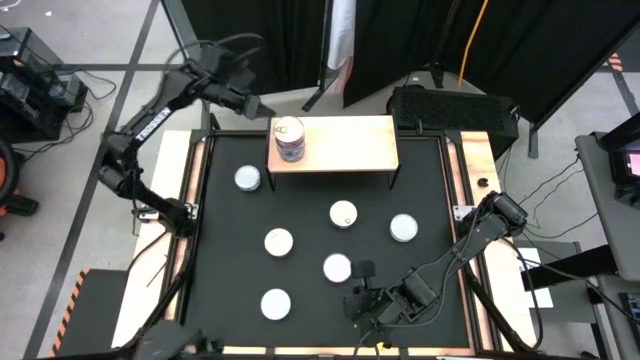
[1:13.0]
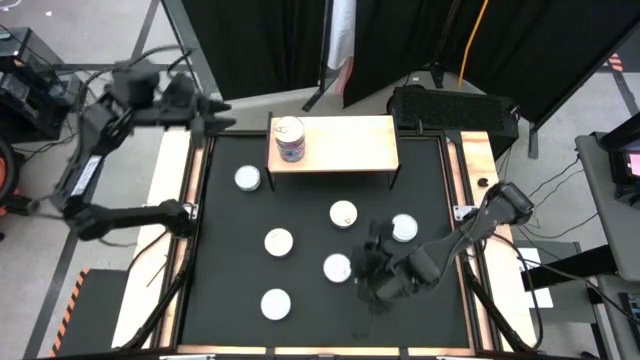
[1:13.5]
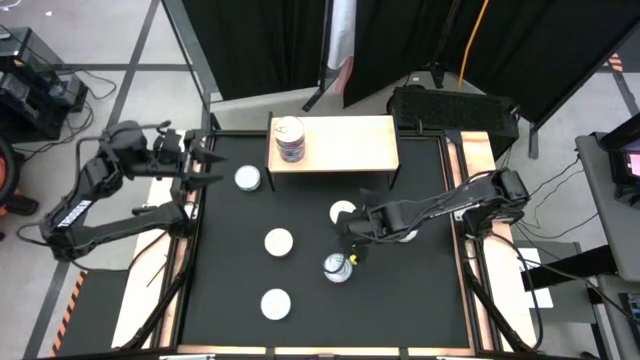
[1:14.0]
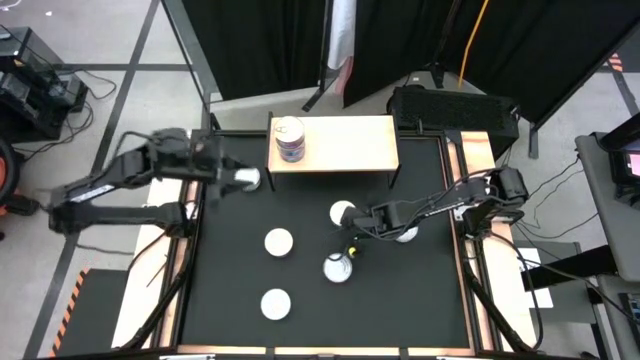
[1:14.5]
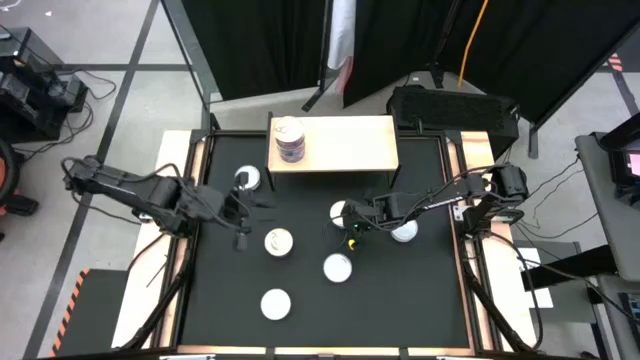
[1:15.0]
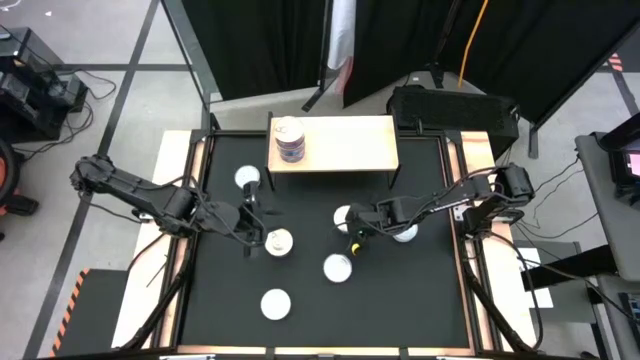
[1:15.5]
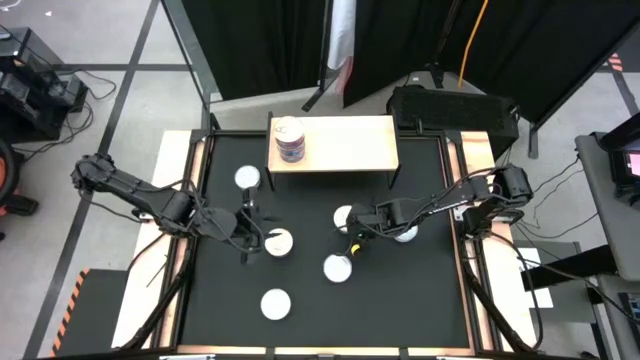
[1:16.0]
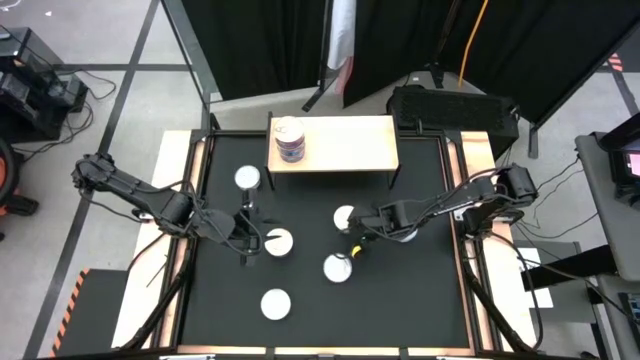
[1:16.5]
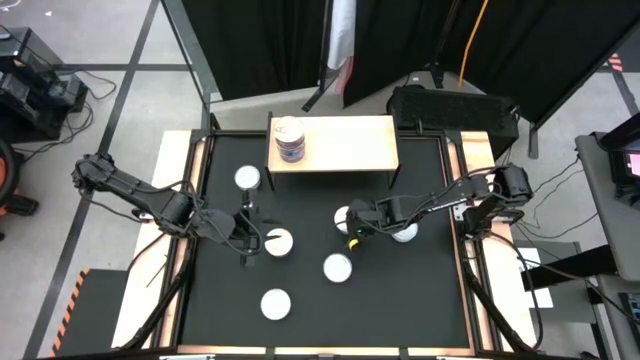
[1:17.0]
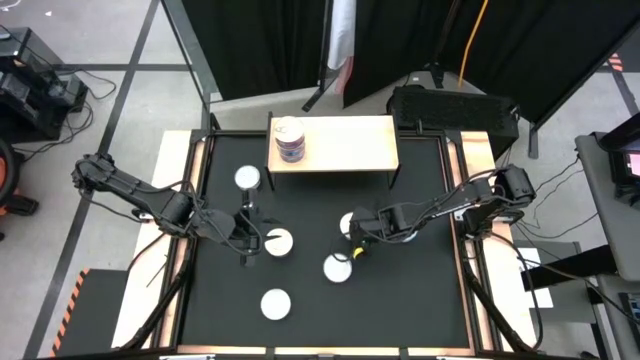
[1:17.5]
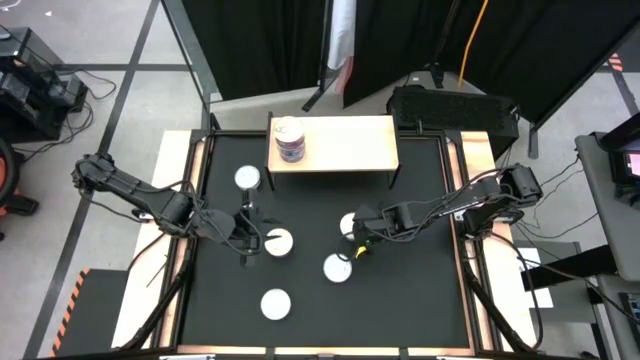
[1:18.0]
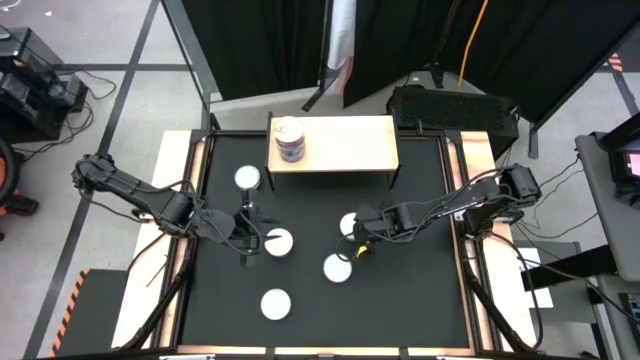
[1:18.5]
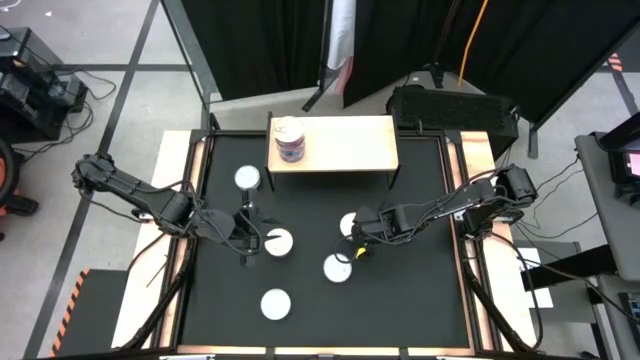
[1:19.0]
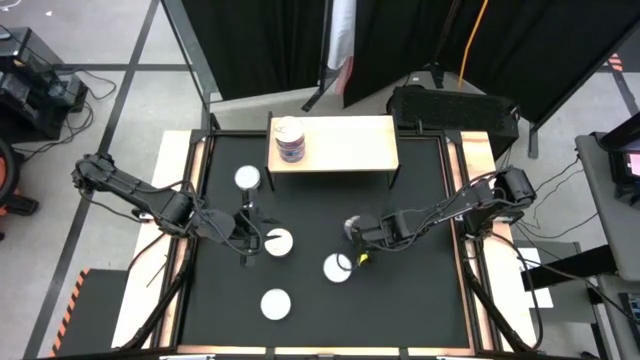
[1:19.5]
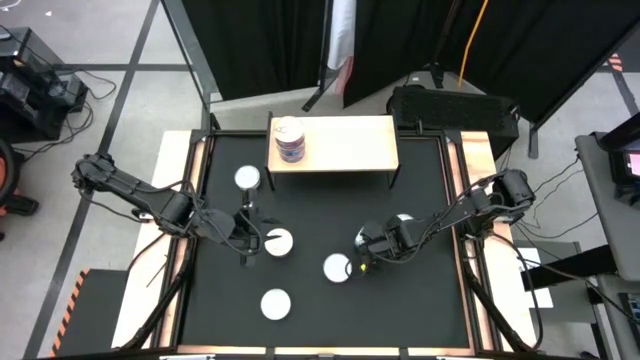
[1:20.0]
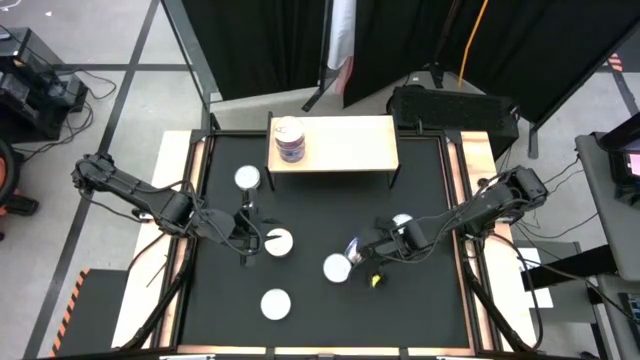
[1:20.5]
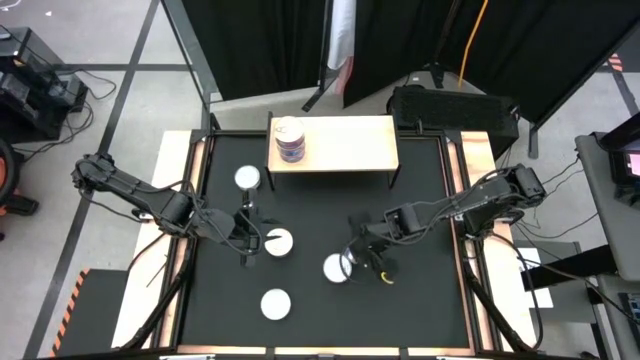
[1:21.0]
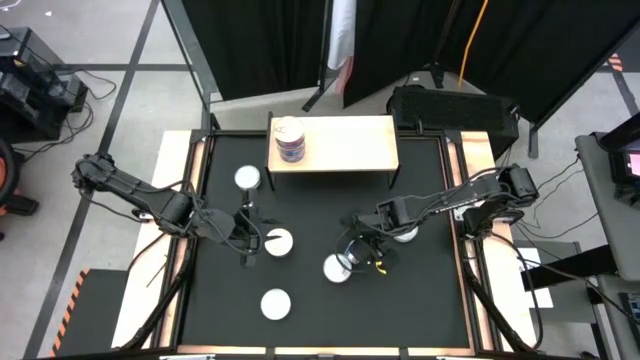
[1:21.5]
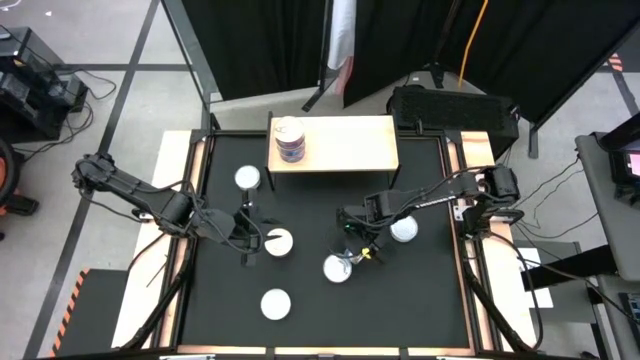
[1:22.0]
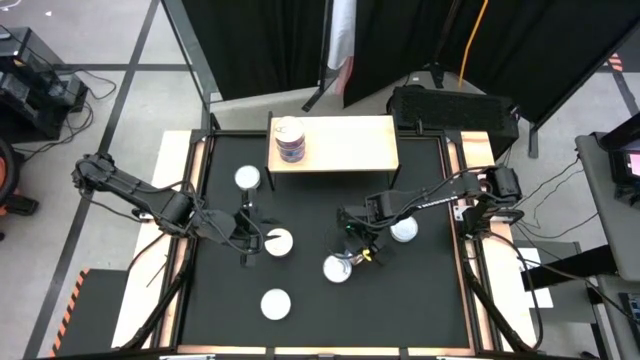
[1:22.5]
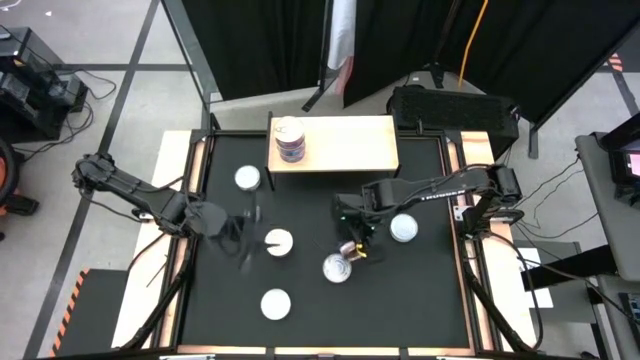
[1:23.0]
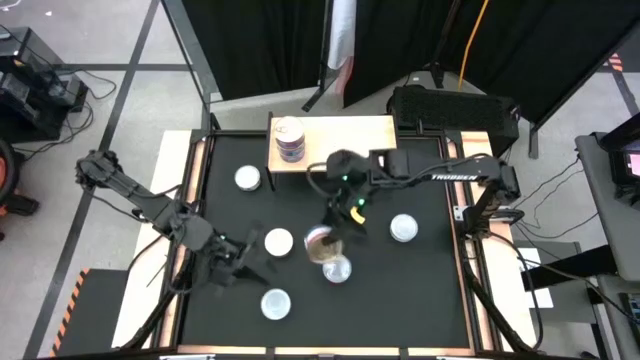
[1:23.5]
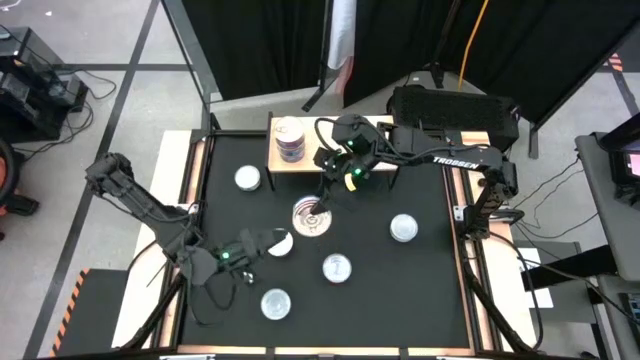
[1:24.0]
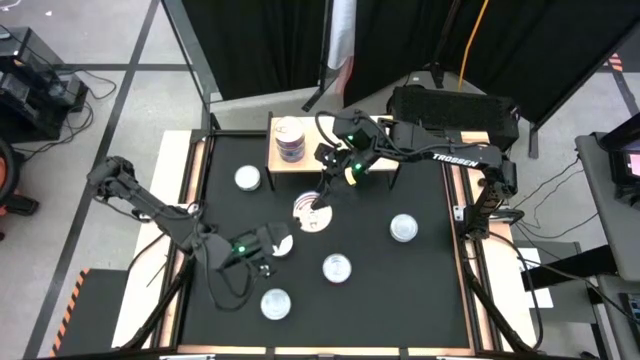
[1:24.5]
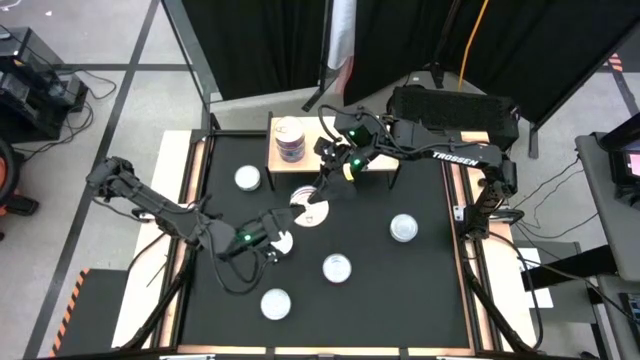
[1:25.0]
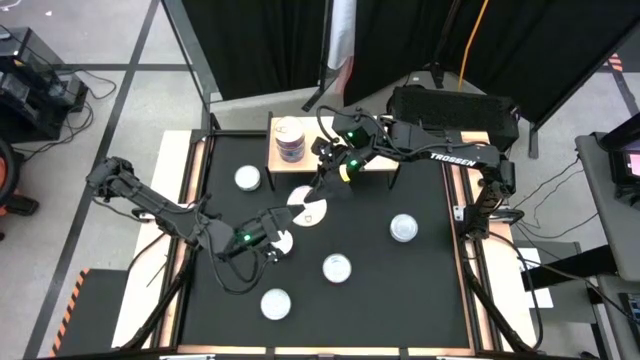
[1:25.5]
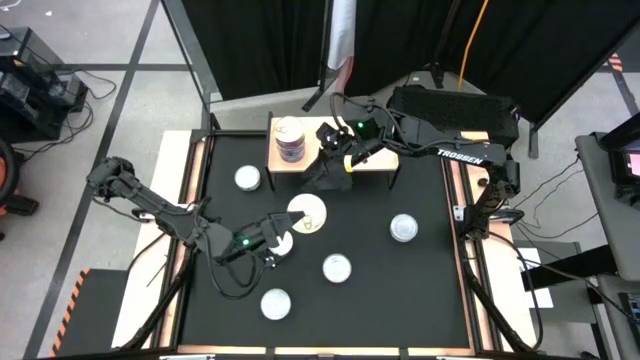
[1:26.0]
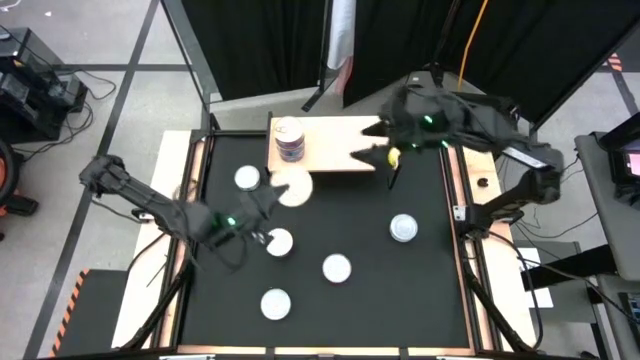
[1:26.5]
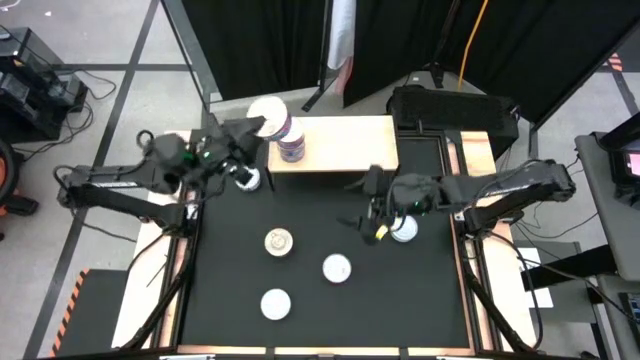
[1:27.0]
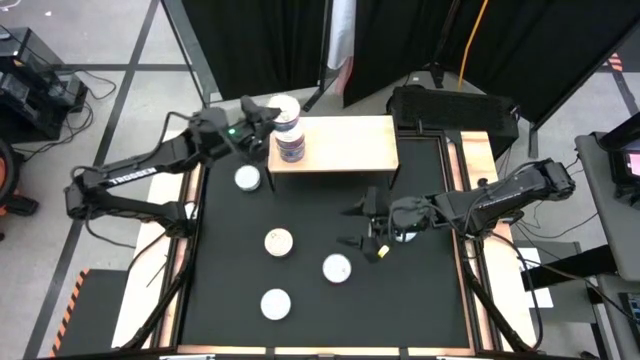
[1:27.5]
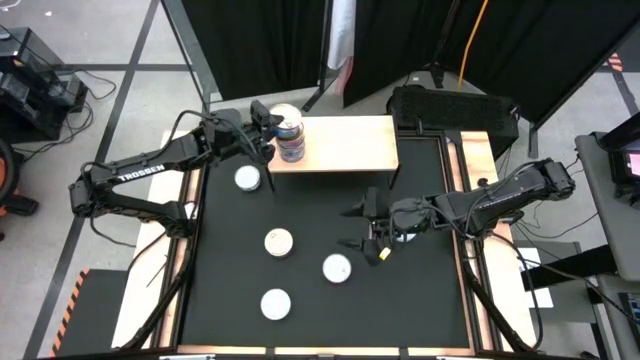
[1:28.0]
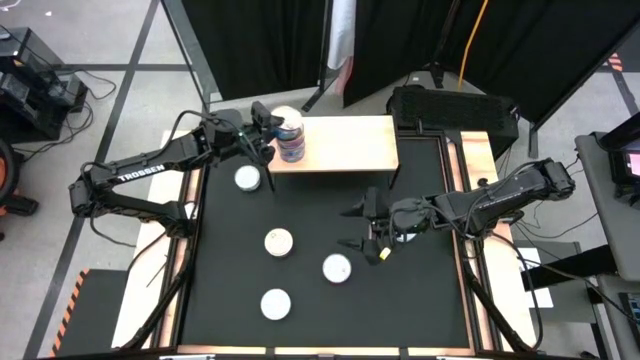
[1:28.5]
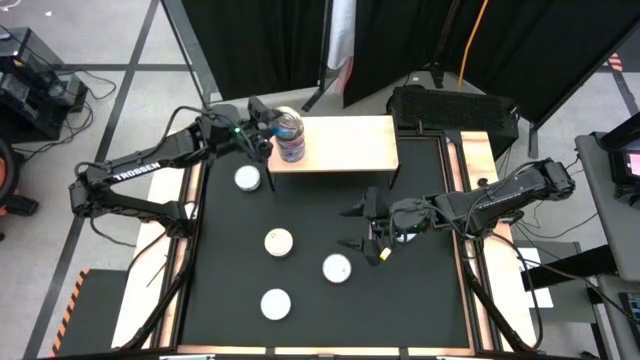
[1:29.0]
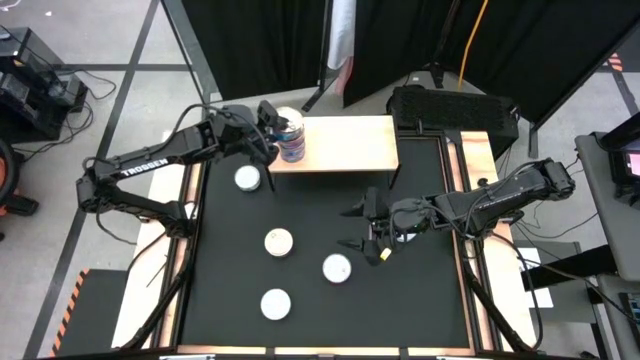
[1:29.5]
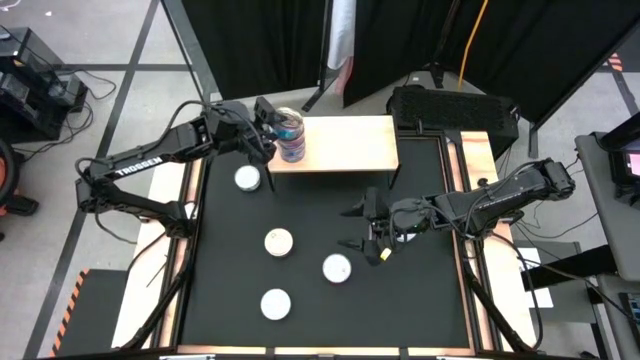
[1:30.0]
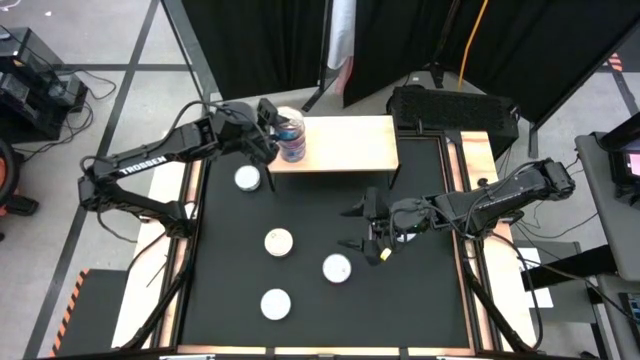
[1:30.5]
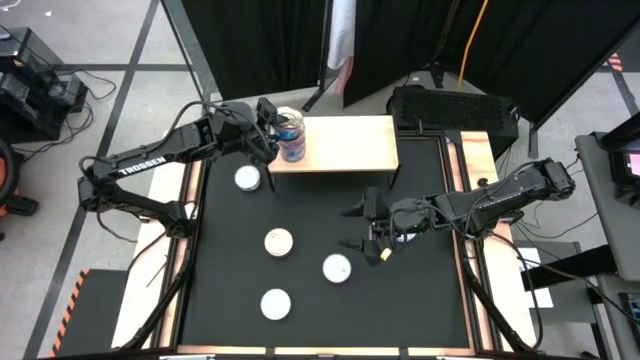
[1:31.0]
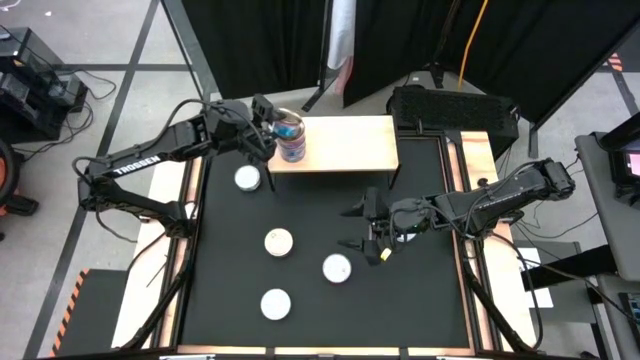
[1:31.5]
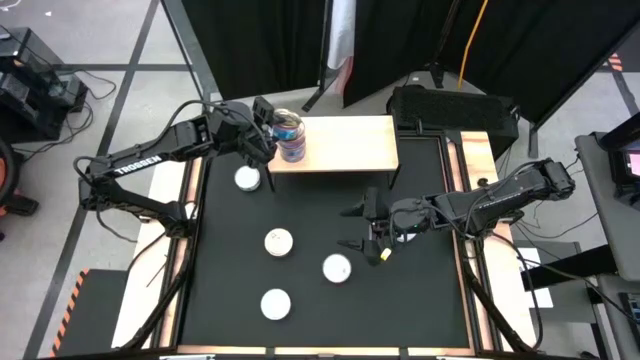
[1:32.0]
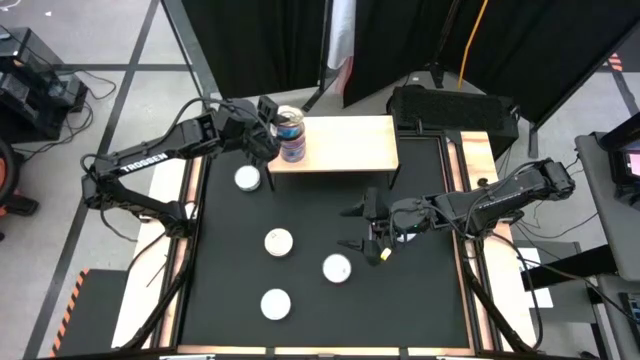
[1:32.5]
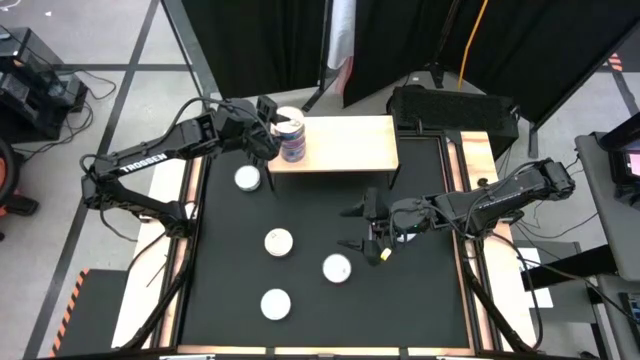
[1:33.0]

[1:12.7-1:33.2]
Task: Stack canned seafood by type on shelf
Stack the blue pink tuna can on top of the other blue pink tuna can on the shelf

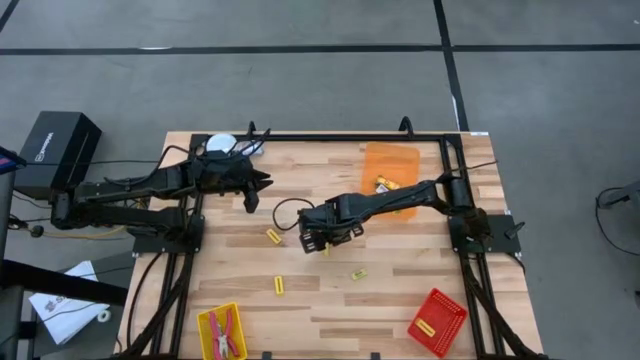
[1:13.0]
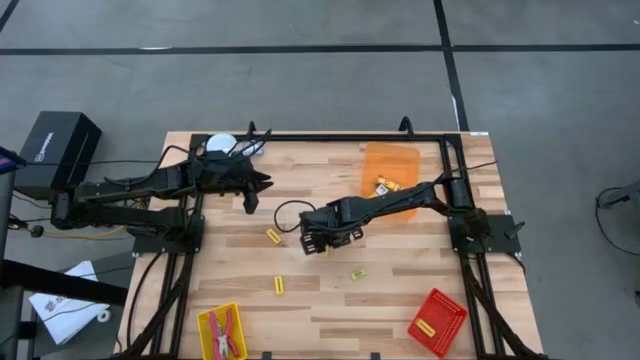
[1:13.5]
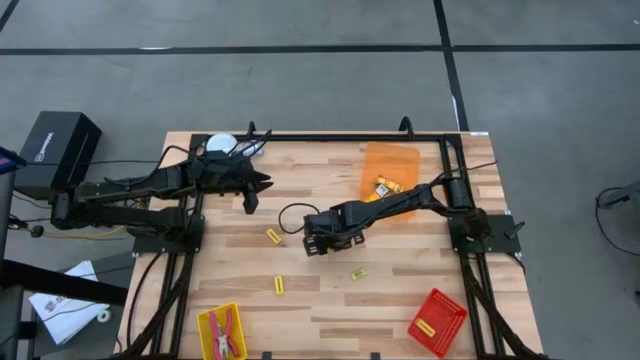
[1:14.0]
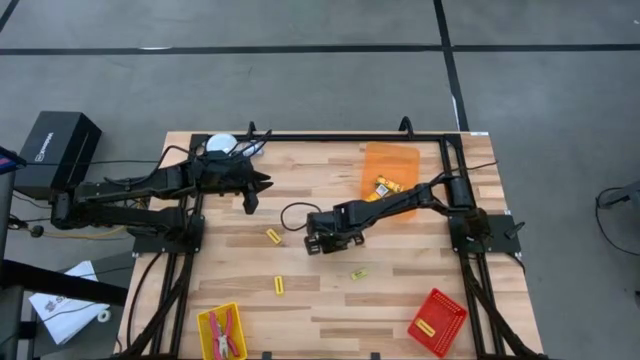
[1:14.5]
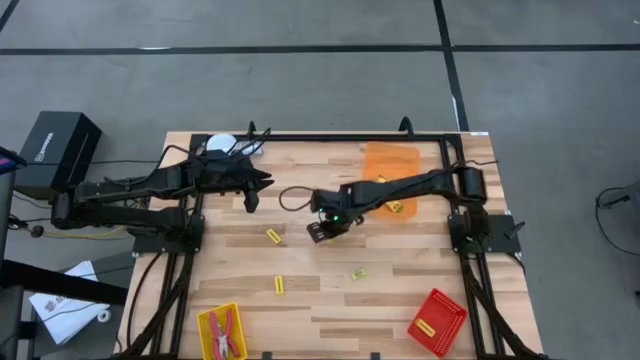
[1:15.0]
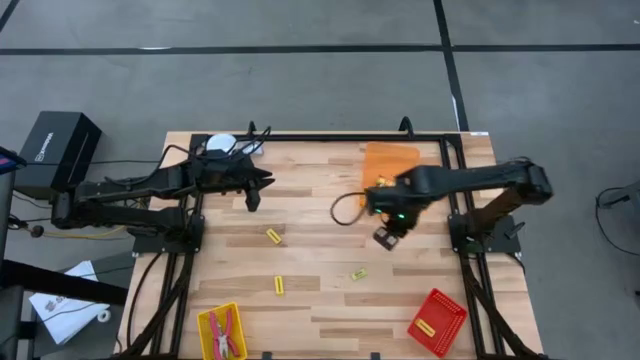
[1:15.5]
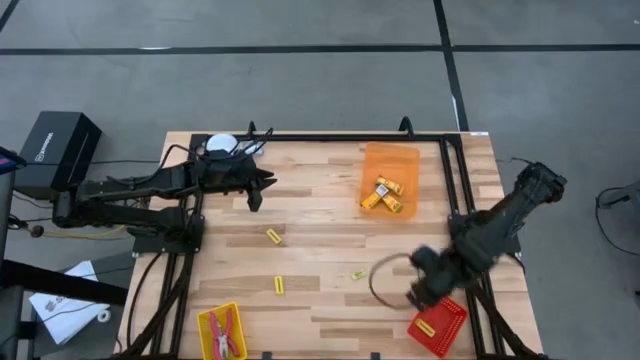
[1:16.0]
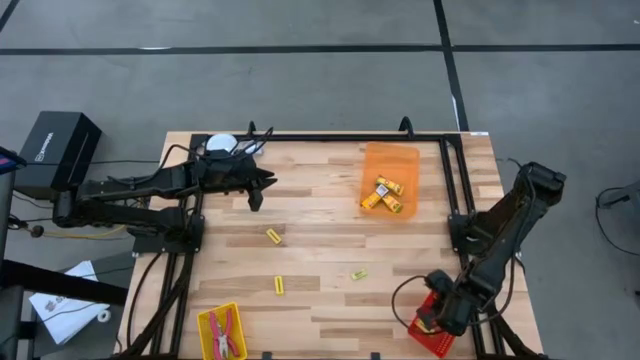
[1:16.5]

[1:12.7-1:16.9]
Task: Pick & Place School Supplies
Put the yellow eraser into the red bin
